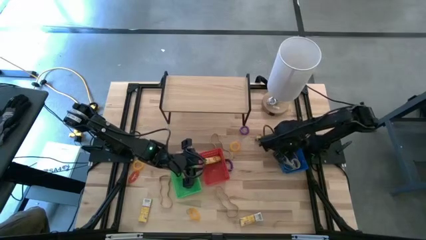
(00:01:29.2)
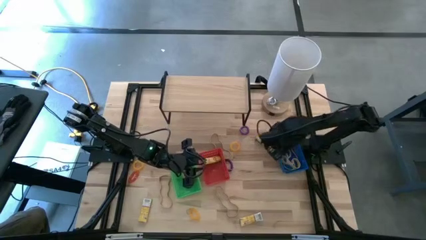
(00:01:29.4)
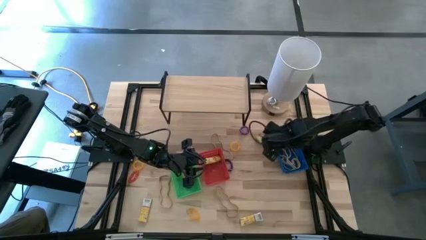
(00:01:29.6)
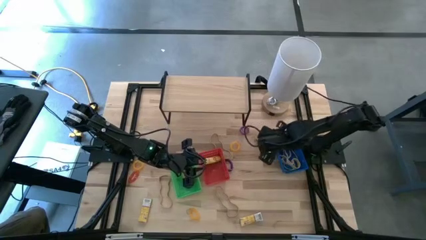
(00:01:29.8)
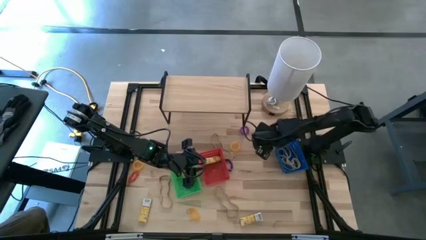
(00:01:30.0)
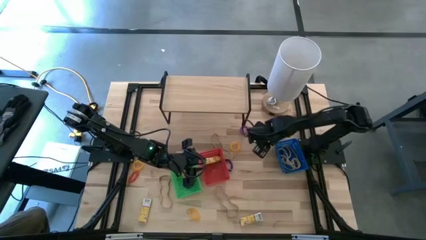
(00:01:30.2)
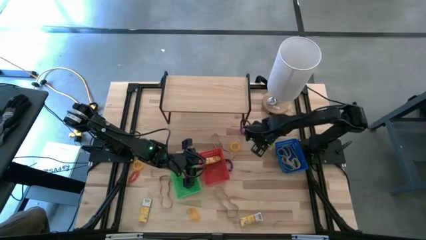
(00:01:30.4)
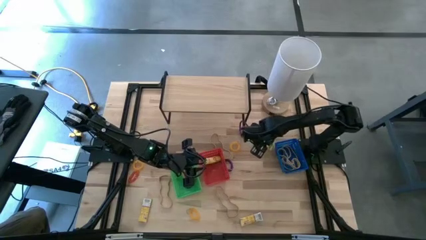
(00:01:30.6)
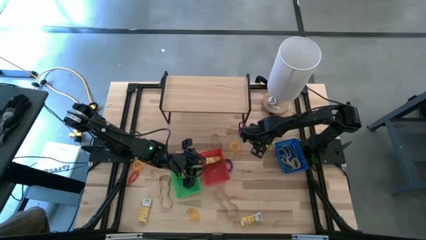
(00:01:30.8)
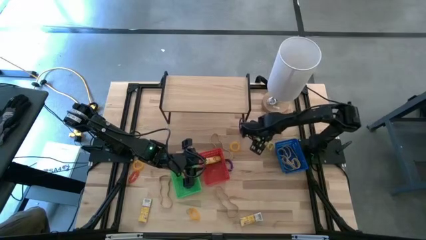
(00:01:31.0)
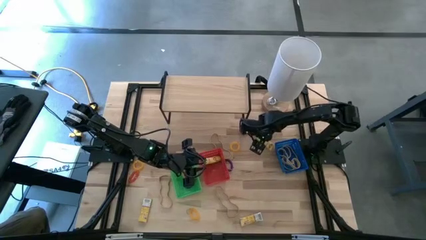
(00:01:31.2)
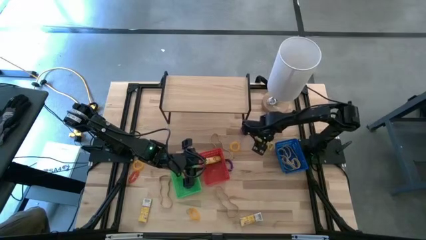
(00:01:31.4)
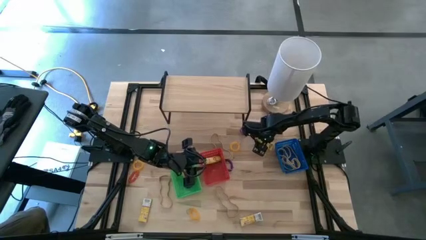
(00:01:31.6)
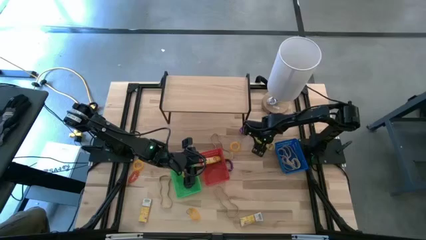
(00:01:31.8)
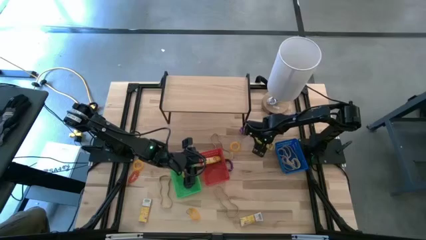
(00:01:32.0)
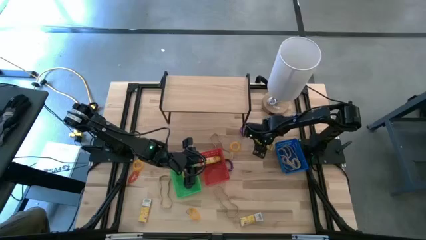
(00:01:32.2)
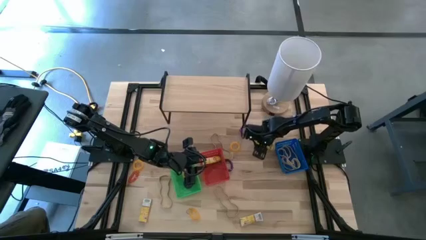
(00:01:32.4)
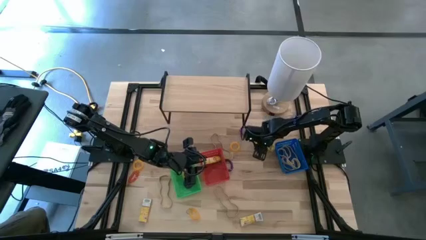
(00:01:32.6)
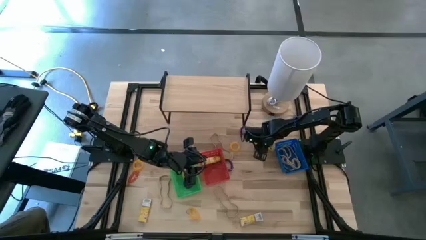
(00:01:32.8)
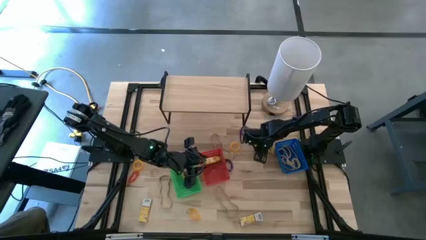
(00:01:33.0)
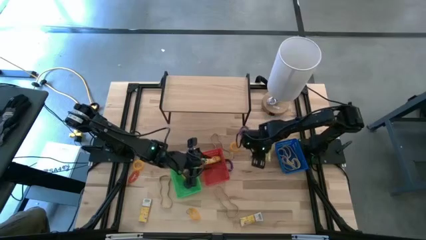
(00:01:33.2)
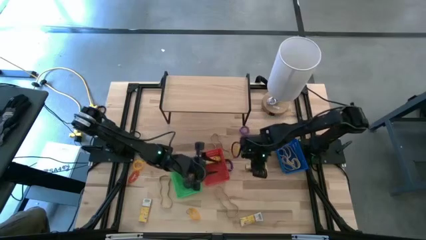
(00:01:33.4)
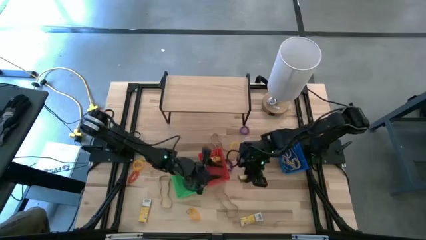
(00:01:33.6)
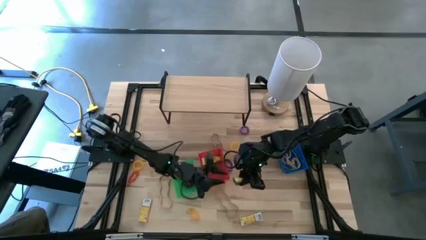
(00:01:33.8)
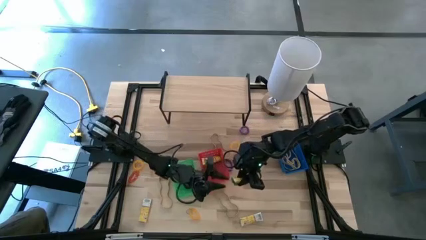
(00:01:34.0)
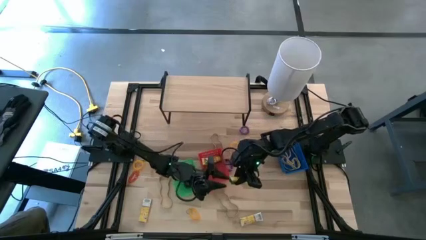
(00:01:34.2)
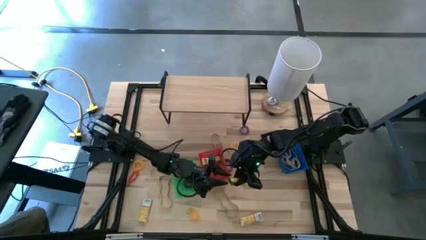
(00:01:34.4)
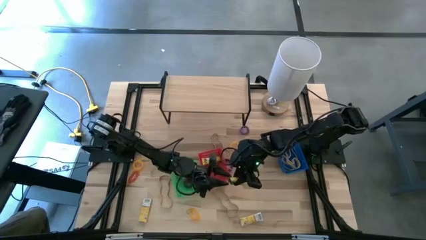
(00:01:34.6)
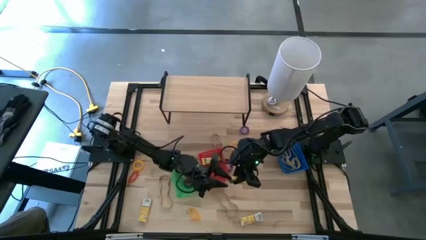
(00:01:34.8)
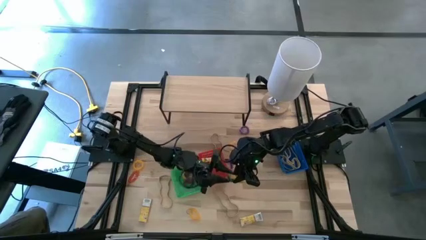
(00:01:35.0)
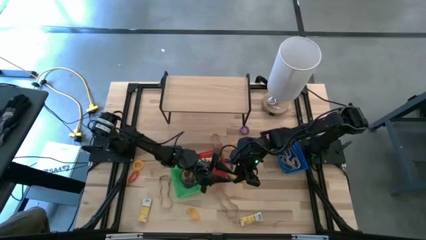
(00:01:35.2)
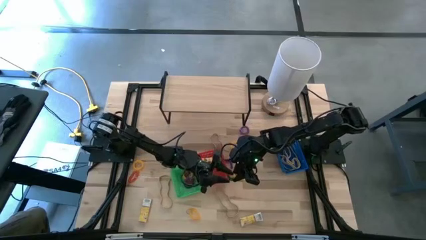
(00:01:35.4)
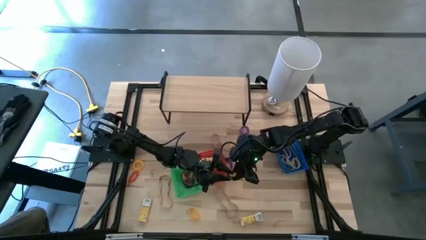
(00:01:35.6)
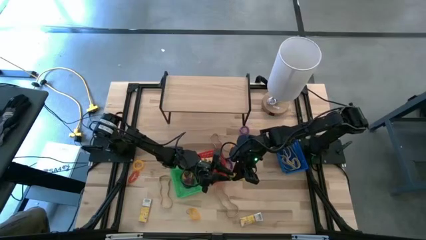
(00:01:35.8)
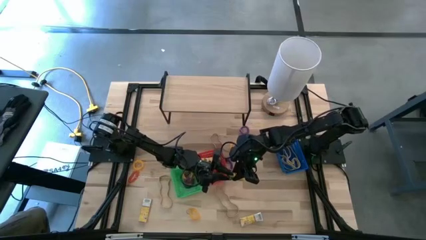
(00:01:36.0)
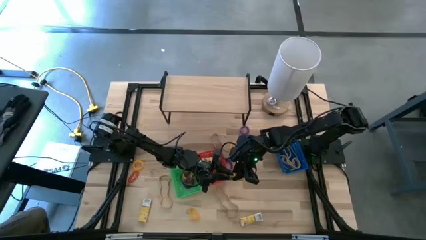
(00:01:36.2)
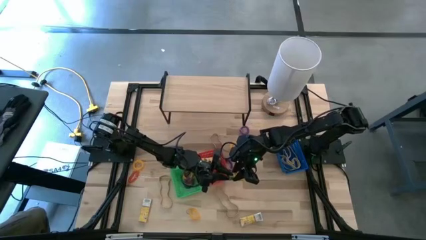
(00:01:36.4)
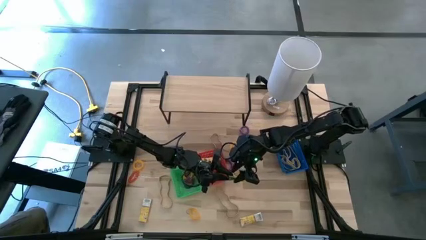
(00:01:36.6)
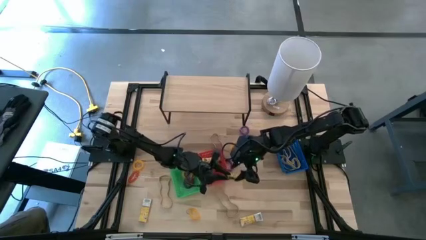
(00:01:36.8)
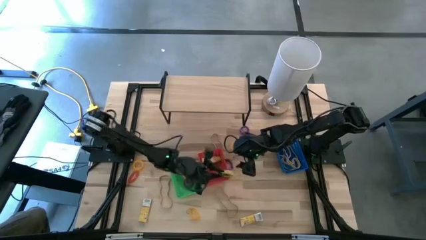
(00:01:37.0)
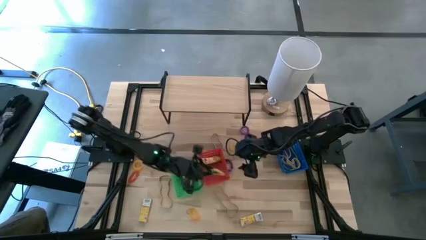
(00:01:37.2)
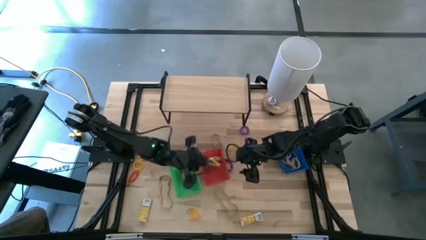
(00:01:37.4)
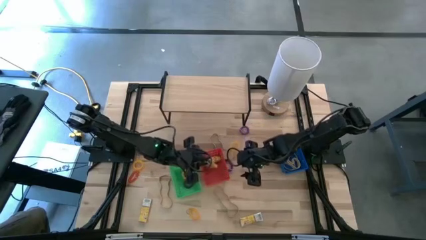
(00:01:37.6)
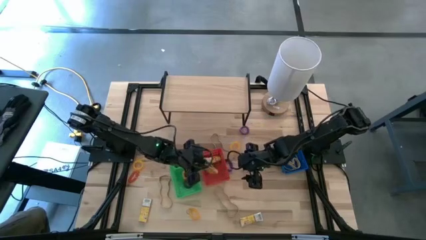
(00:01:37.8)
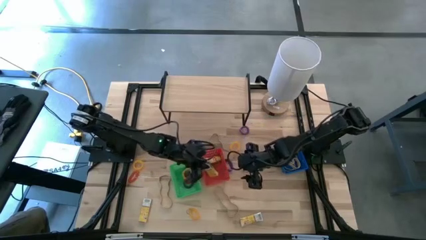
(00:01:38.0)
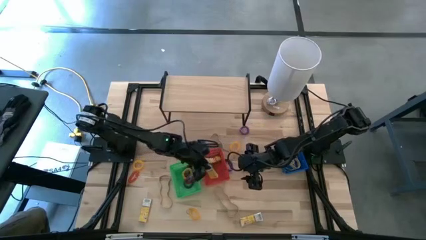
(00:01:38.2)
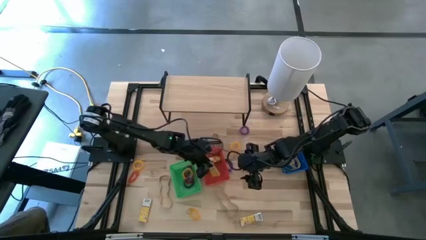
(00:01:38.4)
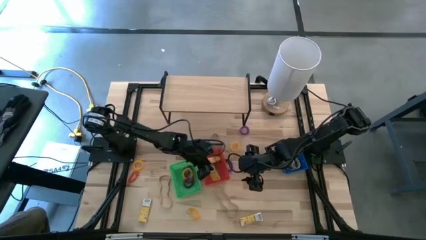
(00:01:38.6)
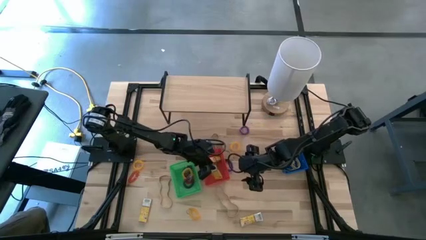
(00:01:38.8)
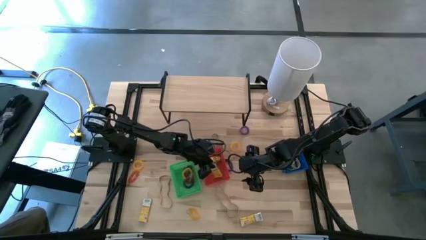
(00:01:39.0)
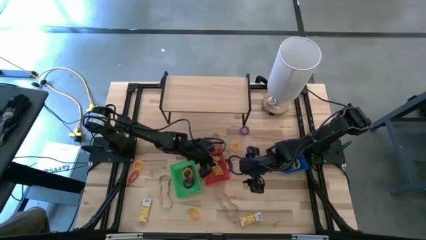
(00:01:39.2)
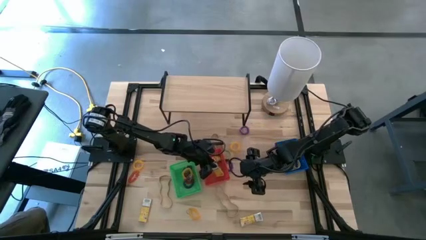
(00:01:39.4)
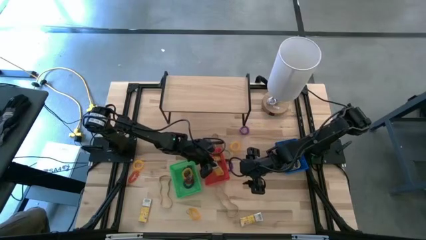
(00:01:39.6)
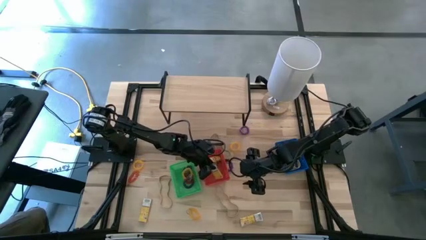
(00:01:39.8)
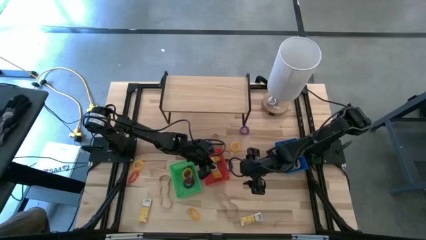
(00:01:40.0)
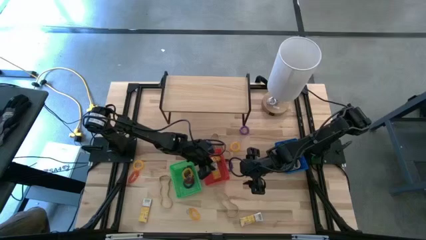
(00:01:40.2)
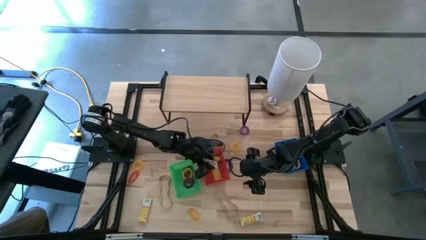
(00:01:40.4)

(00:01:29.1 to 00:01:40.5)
Task: Pick & Place Office Desk Supplies
Put the yellow crayon box into the red bin
